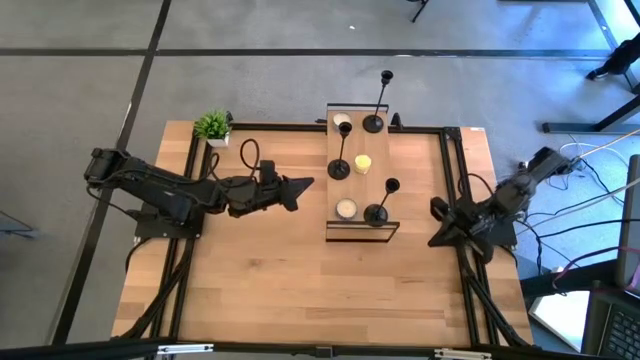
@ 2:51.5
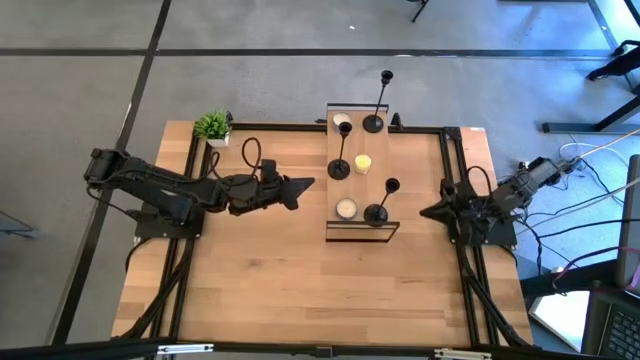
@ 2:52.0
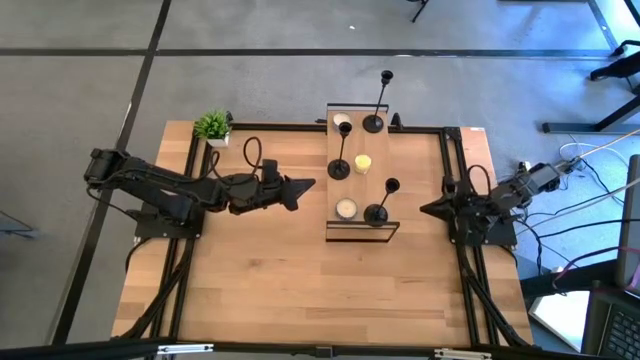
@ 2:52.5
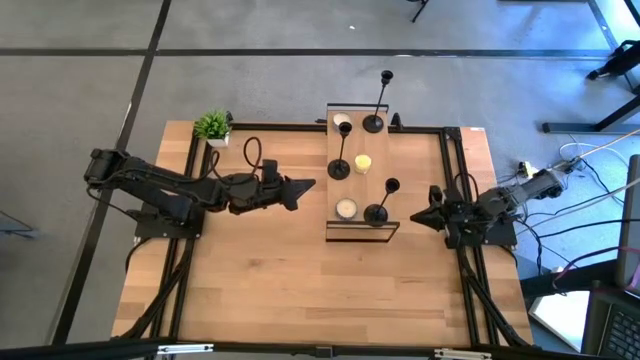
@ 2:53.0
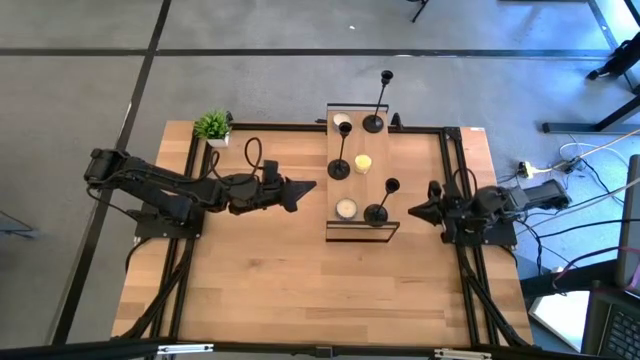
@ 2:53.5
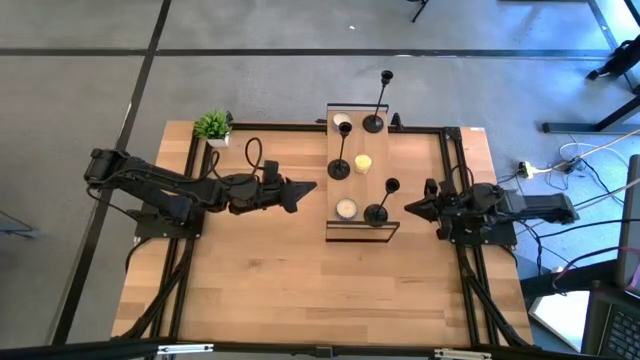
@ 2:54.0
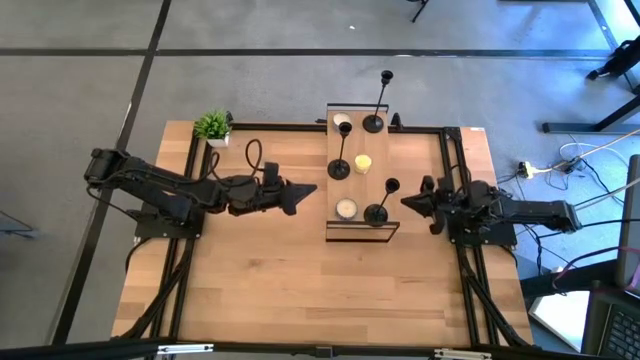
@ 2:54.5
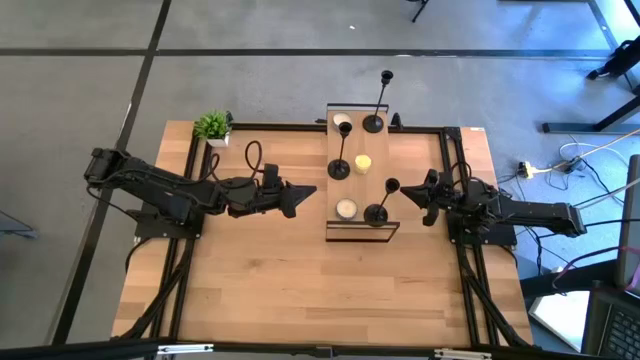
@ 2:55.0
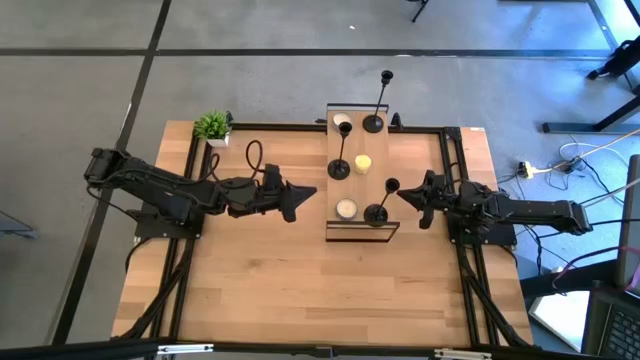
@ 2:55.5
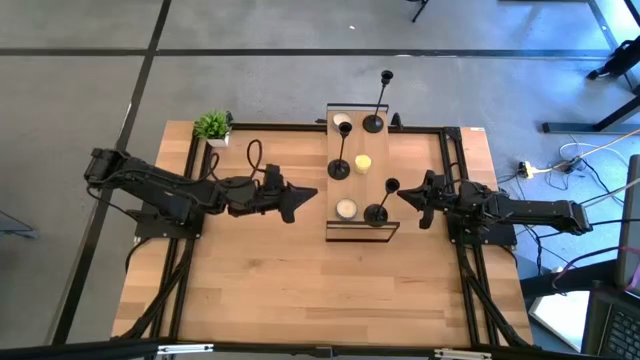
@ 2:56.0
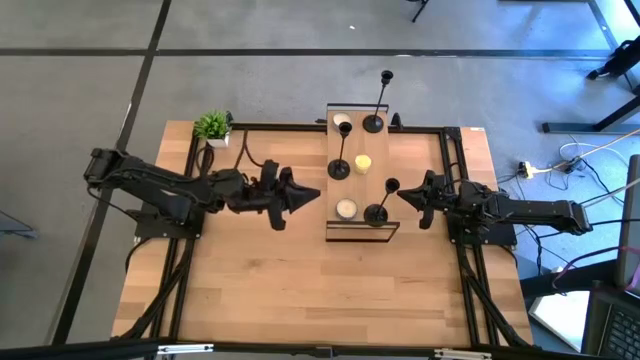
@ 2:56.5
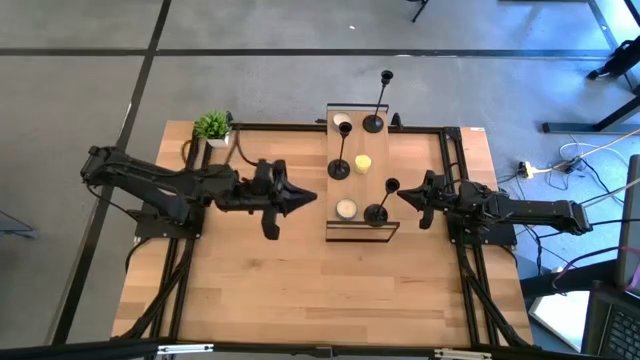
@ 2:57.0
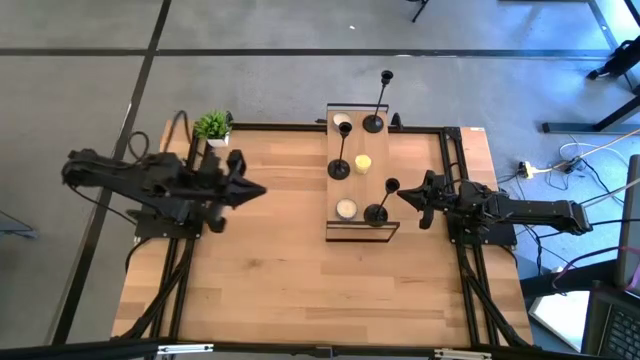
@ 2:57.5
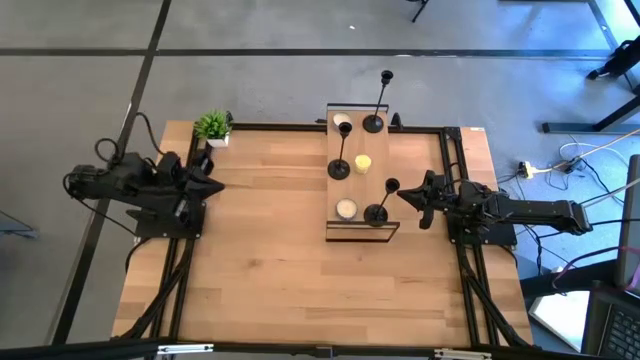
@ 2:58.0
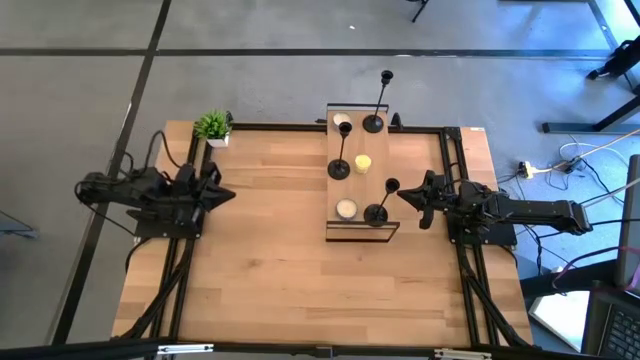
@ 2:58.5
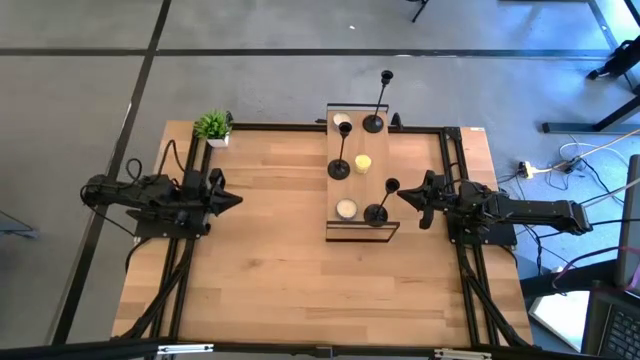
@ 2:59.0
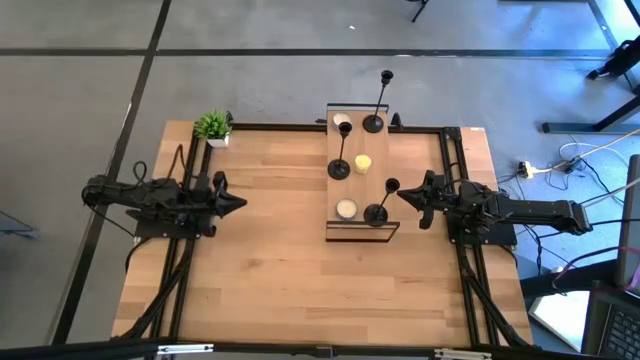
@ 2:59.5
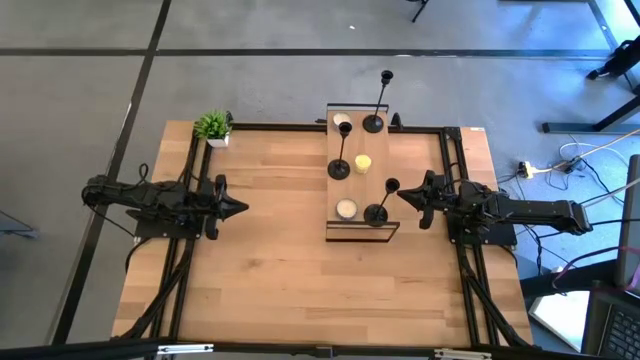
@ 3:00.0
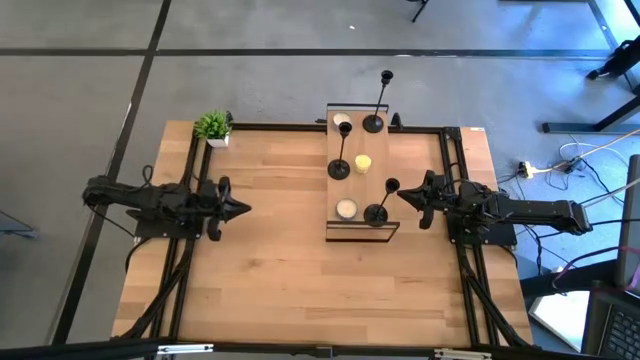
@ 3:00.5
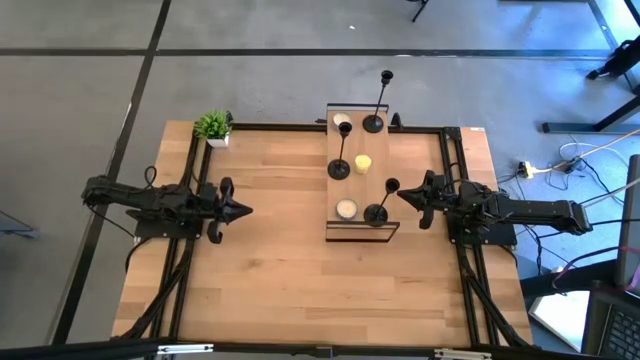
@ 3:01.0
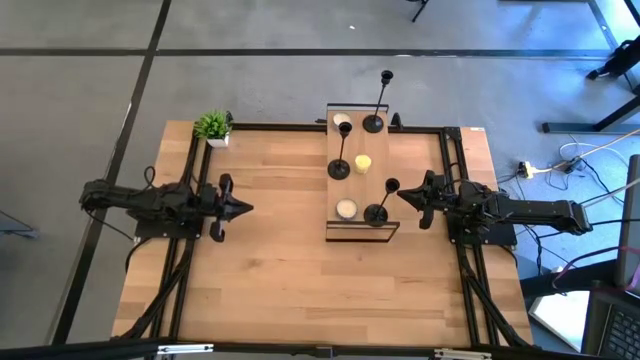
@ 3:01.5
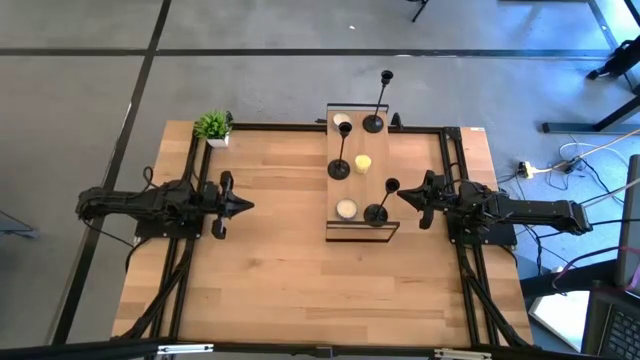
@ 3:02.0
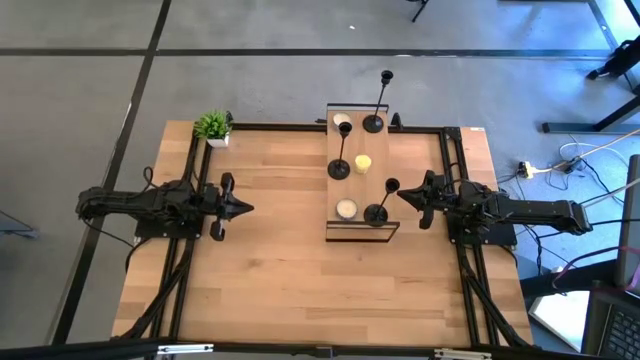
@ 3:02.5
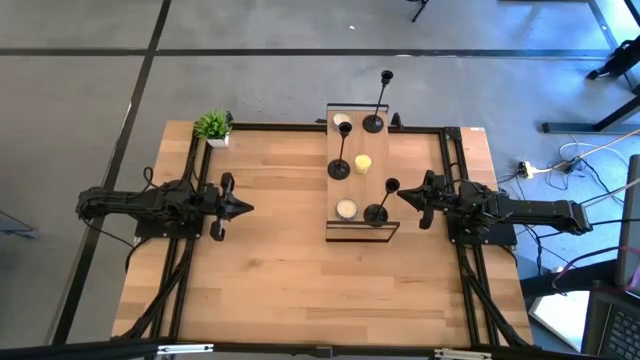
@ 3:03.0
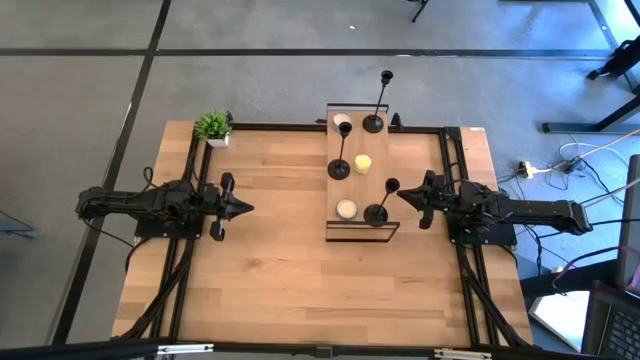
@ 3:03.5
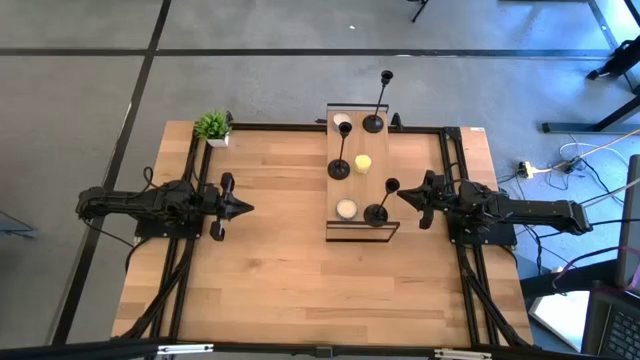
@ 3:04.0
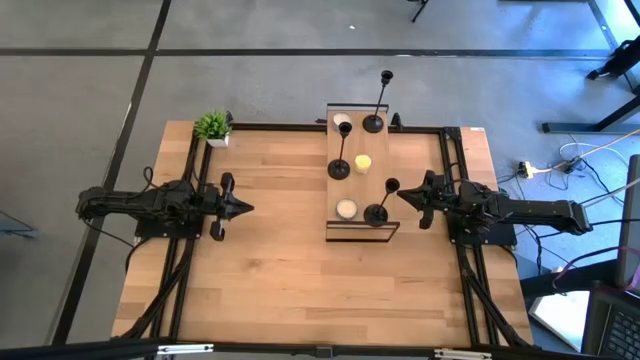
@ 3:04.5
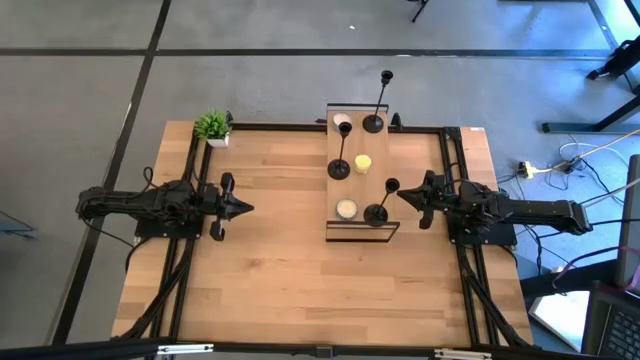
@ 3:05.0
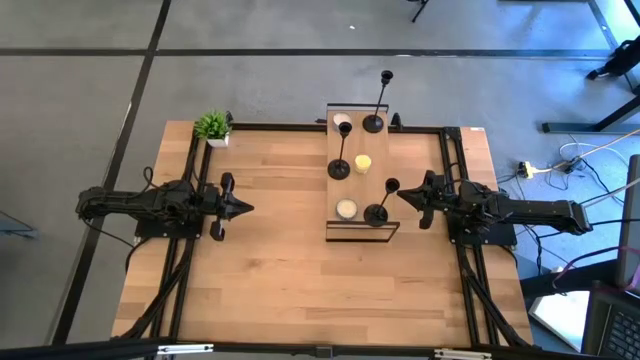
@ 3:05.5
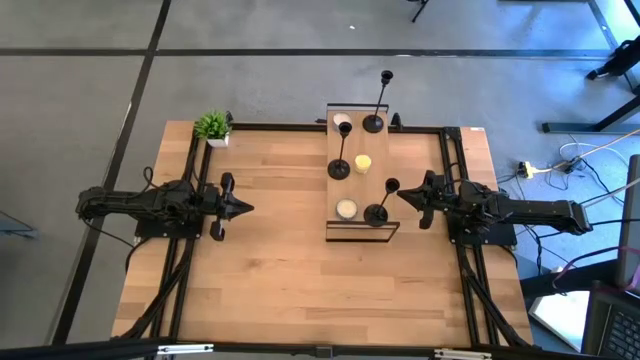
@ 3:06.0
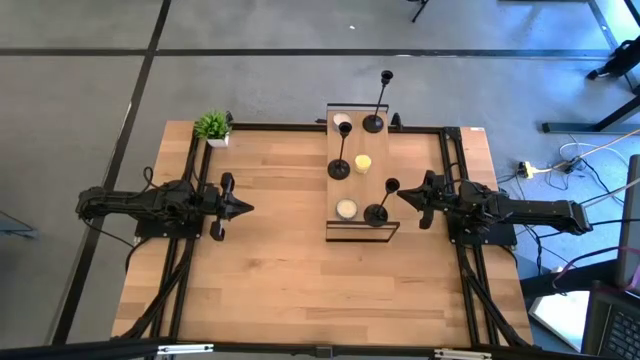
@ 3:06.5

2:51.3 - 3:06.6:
Task: Pick & Place candle stick holders
Return to Home Position

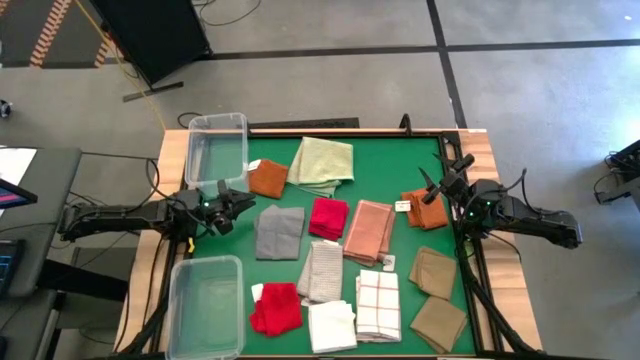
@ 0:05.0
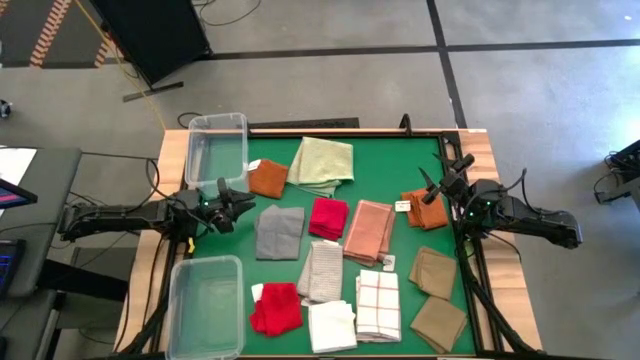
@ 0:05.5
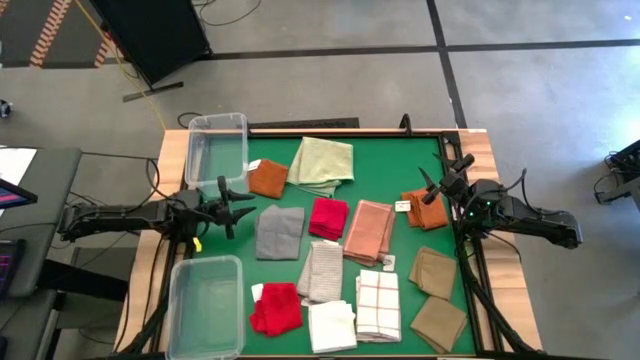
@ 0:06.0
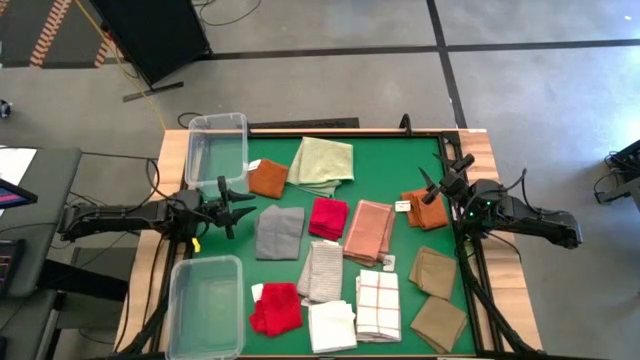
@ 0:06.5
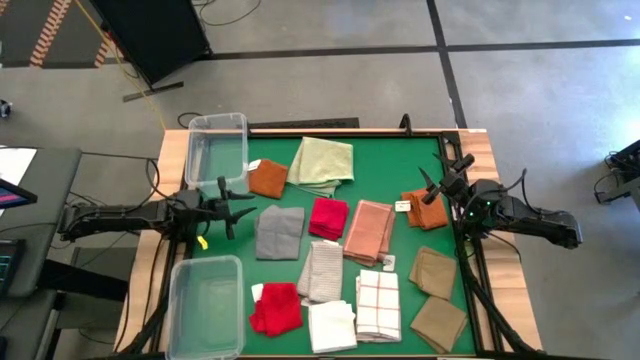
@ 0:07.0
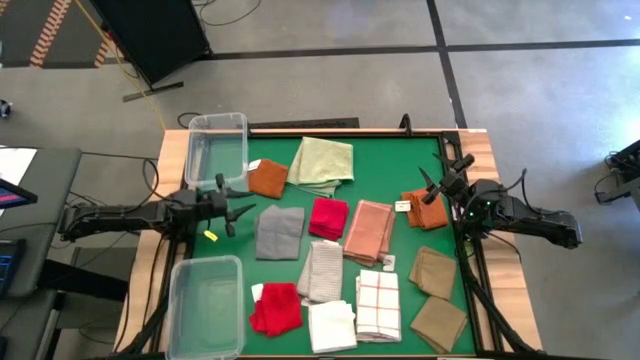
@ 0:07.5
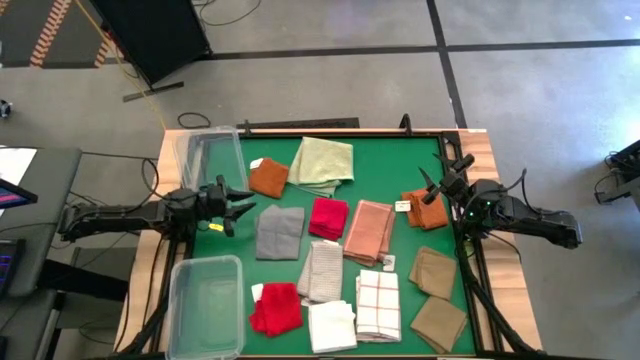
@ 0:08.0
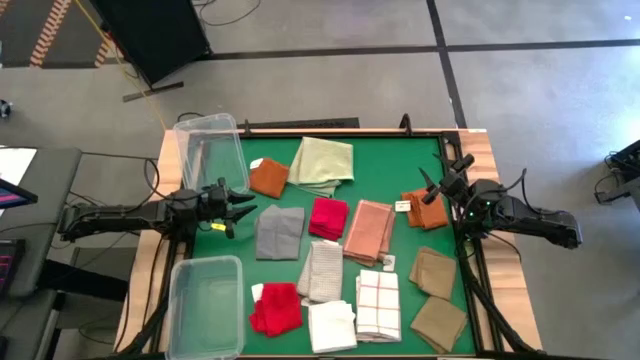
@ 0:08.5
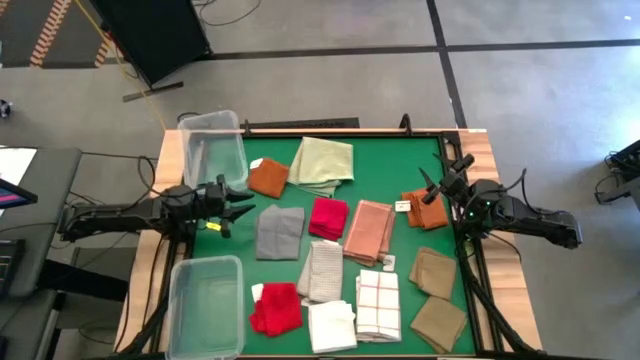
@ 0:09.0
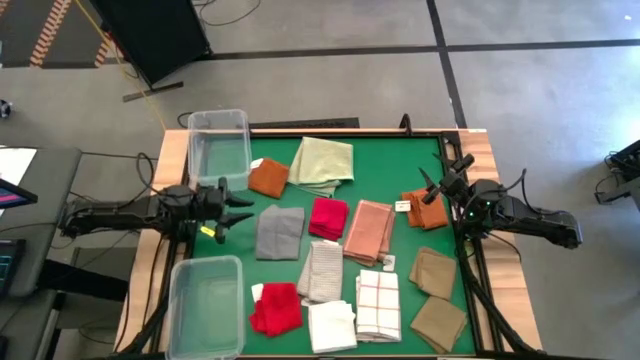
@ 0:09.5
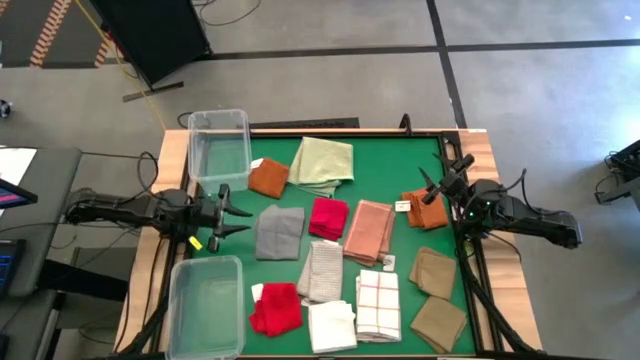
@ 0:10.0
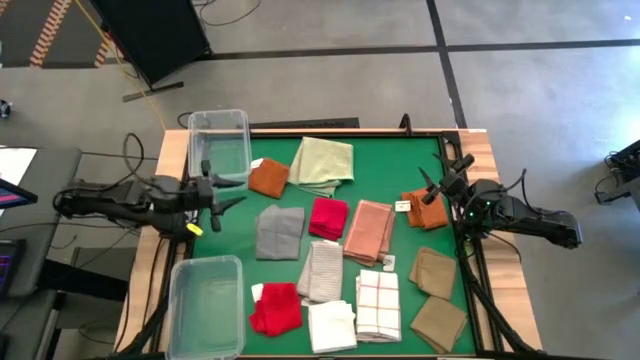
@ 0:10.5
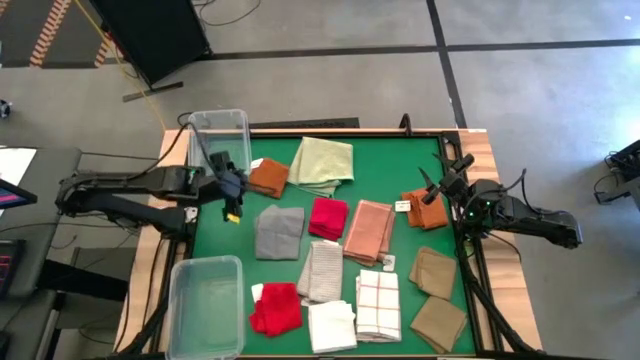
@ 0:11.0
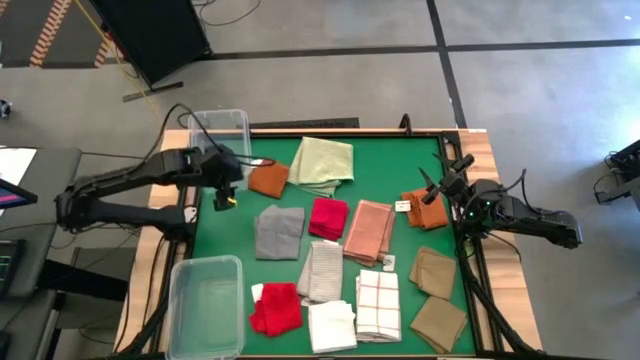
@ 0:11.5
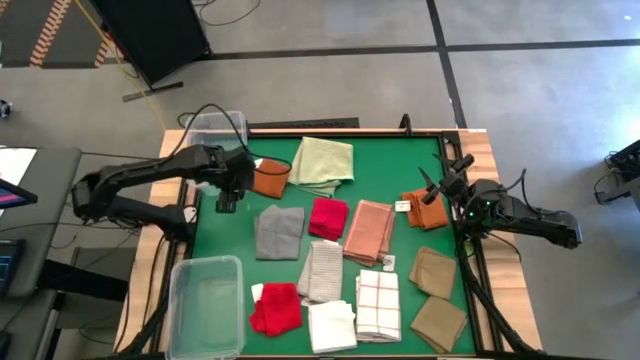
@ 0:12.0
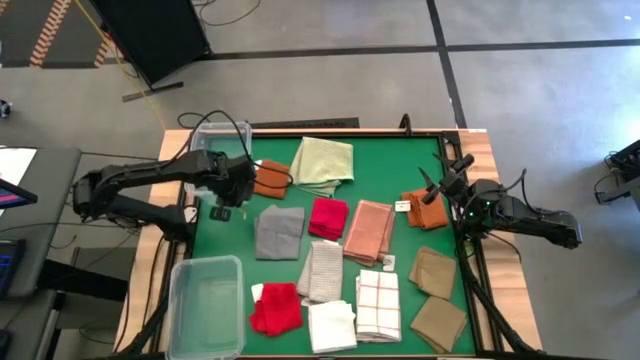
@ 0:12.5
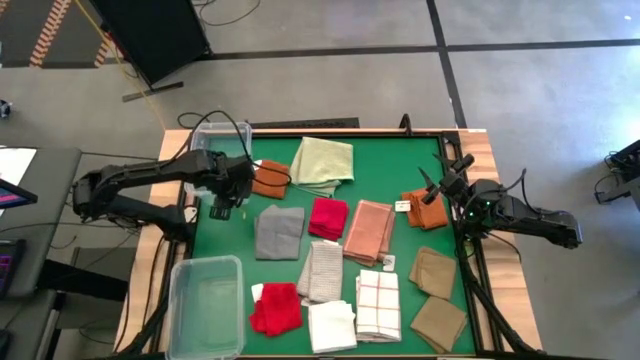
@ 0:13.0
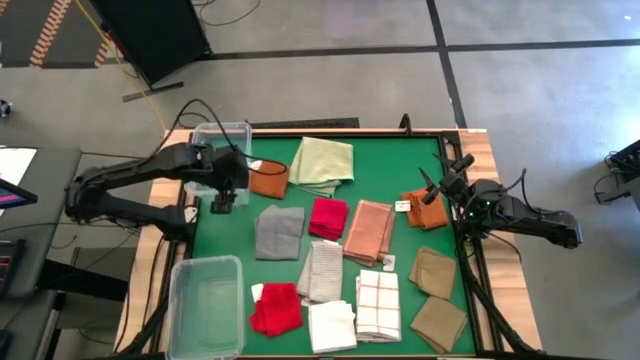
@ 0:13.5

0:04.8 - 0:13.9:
Task: Sort towels by color in basket
Adjust the top transparent bin
